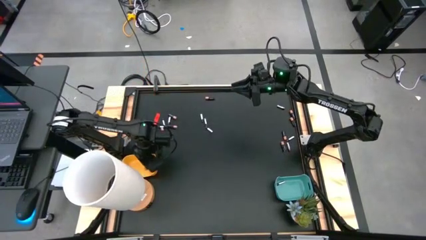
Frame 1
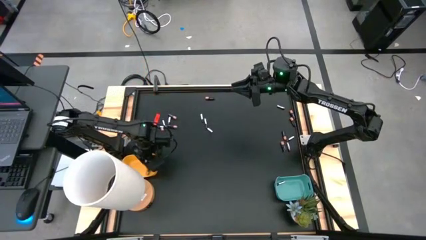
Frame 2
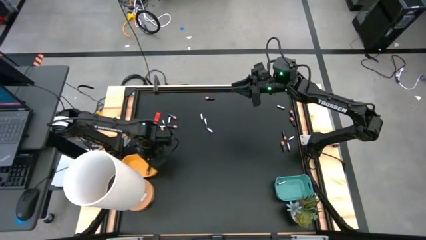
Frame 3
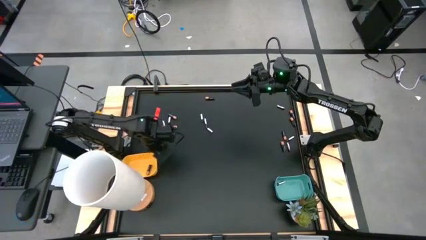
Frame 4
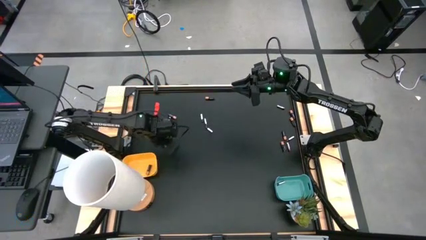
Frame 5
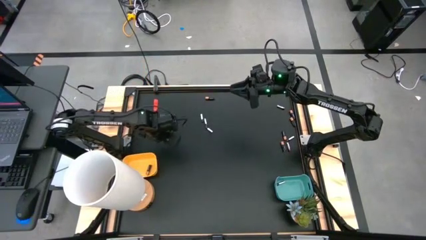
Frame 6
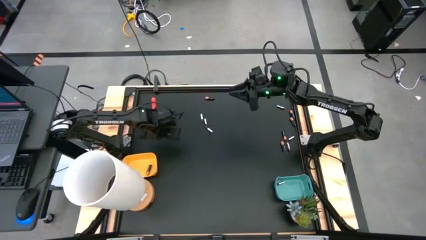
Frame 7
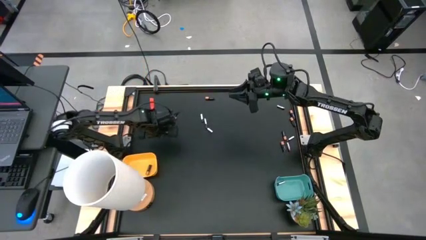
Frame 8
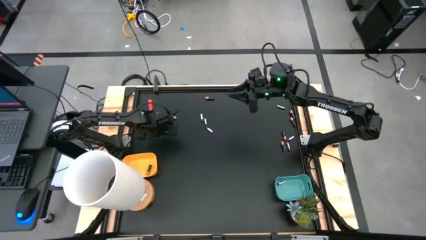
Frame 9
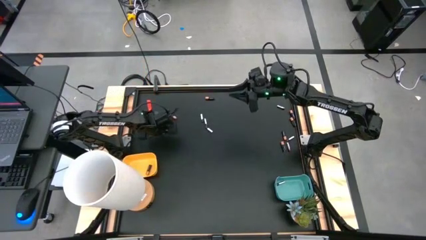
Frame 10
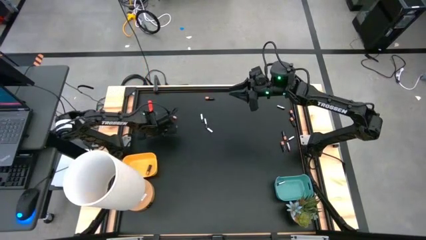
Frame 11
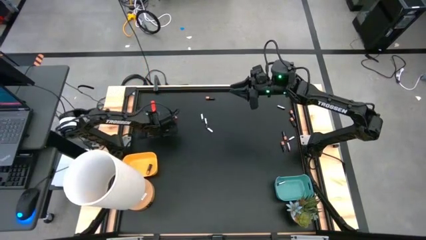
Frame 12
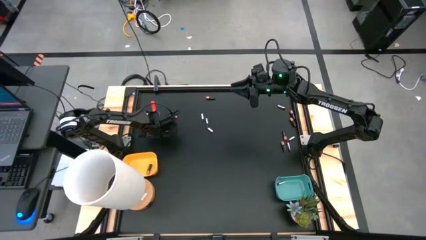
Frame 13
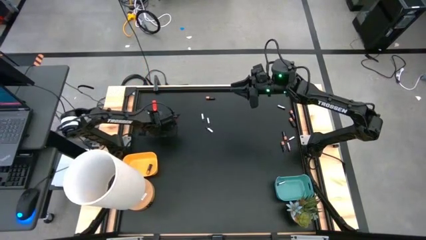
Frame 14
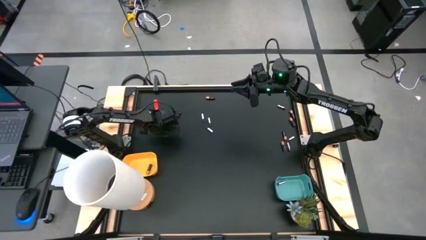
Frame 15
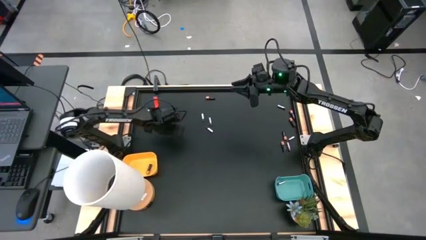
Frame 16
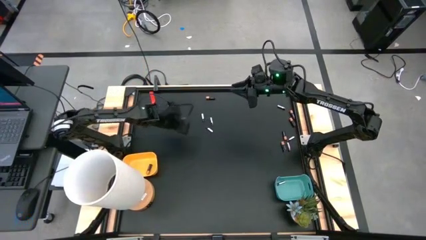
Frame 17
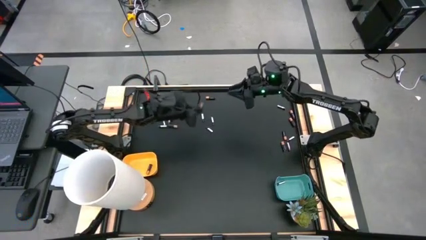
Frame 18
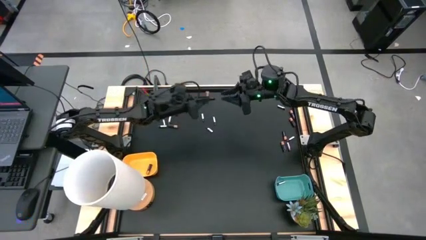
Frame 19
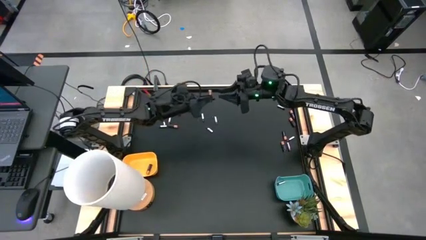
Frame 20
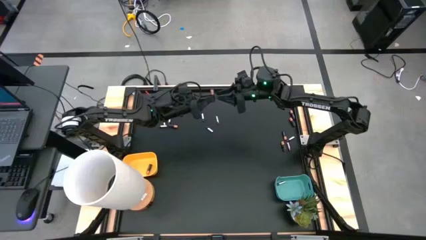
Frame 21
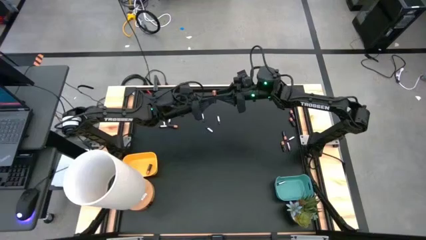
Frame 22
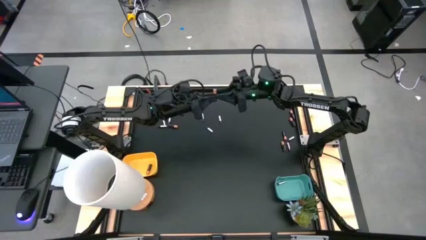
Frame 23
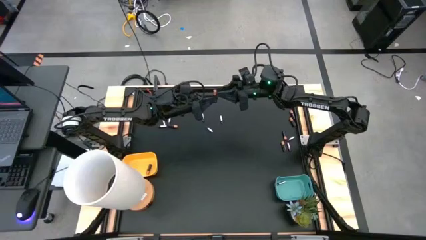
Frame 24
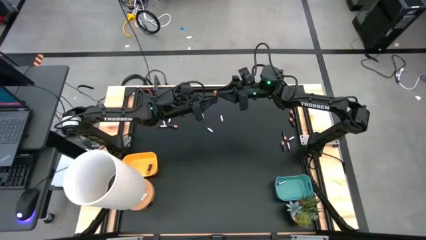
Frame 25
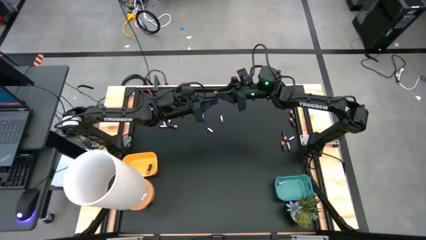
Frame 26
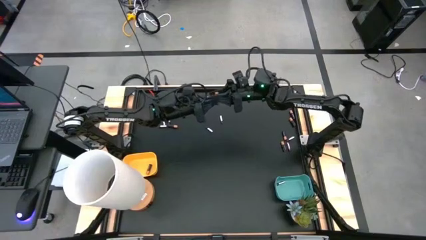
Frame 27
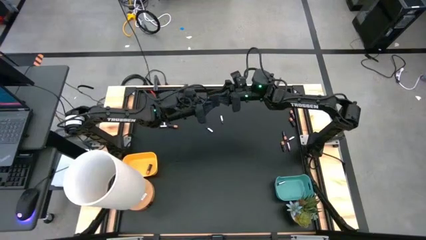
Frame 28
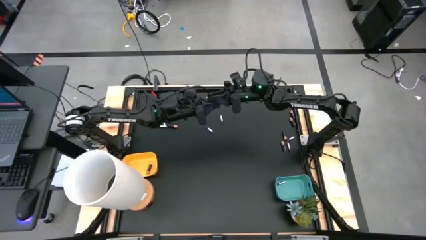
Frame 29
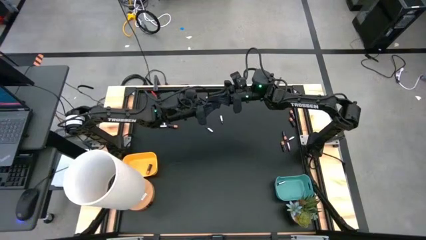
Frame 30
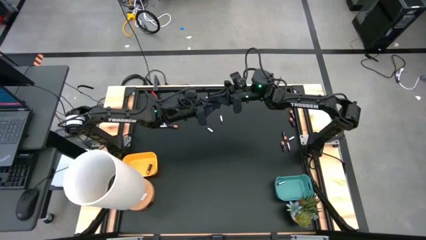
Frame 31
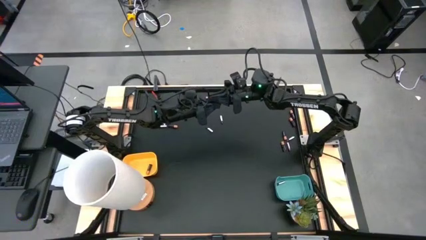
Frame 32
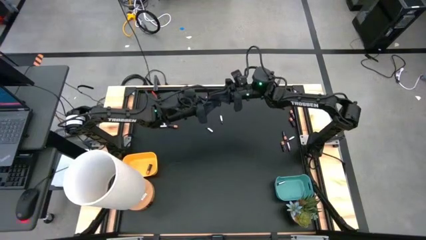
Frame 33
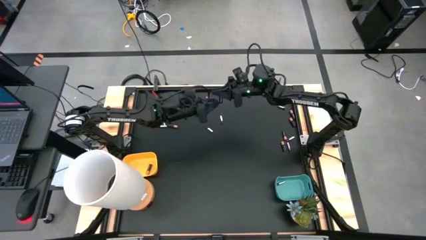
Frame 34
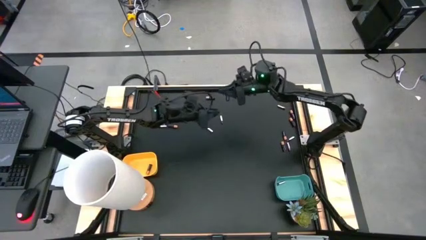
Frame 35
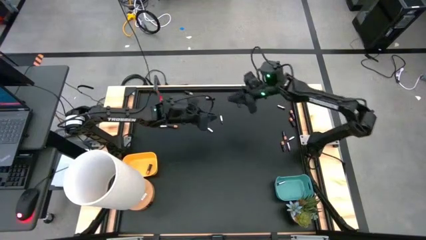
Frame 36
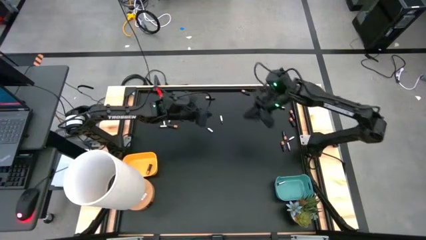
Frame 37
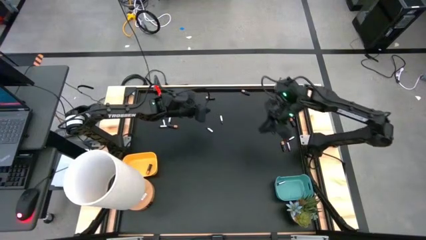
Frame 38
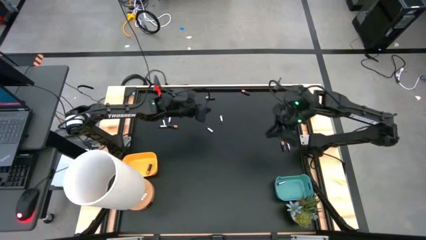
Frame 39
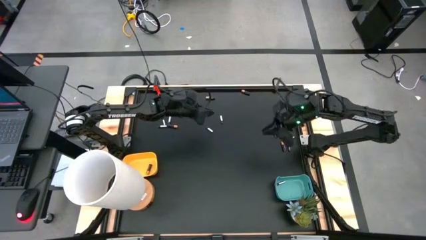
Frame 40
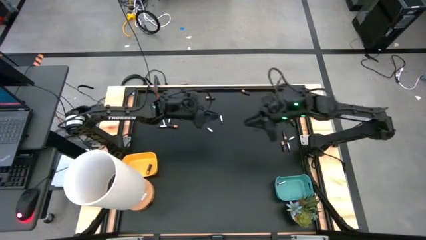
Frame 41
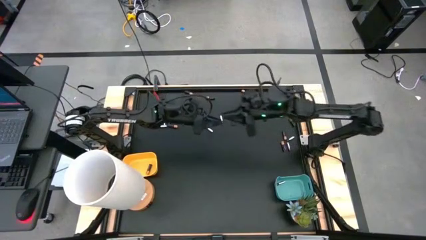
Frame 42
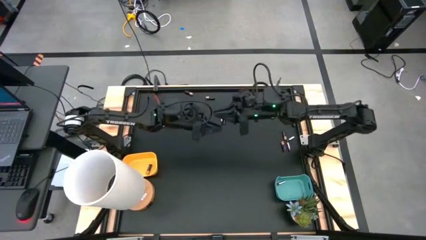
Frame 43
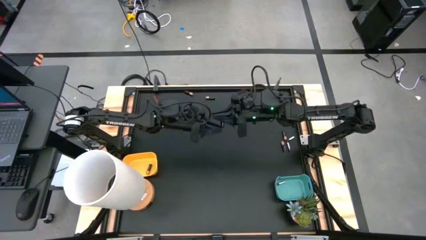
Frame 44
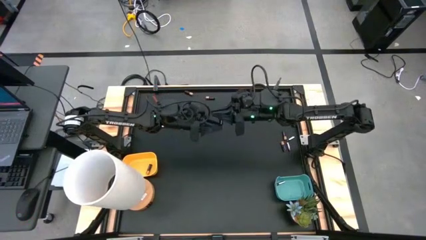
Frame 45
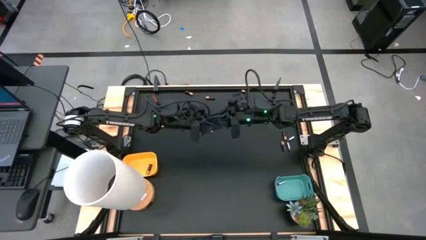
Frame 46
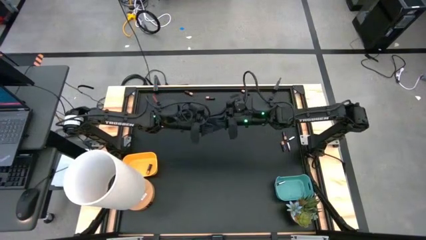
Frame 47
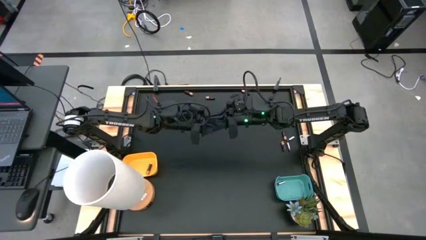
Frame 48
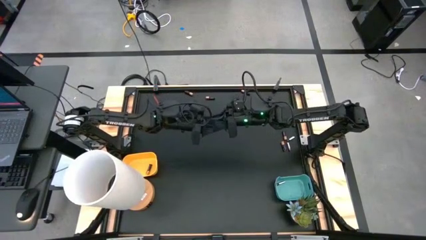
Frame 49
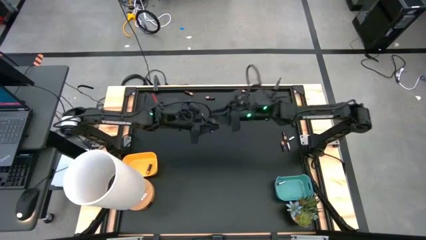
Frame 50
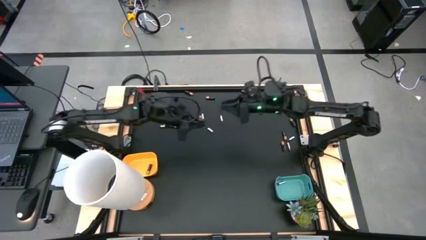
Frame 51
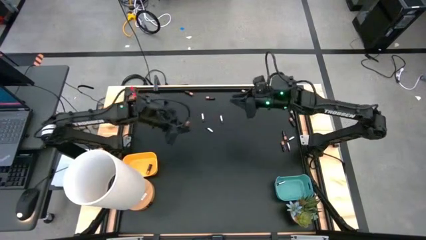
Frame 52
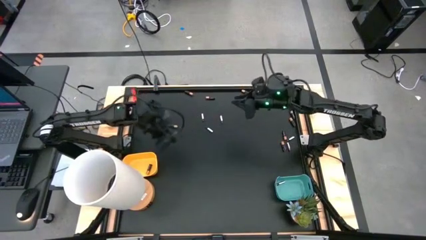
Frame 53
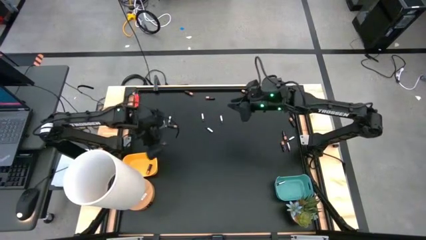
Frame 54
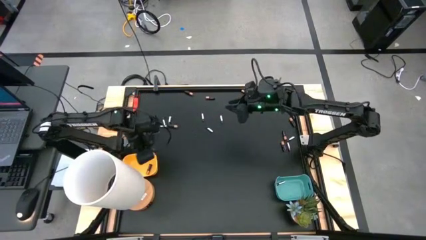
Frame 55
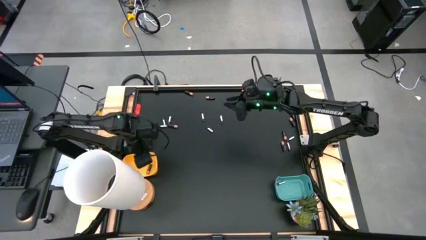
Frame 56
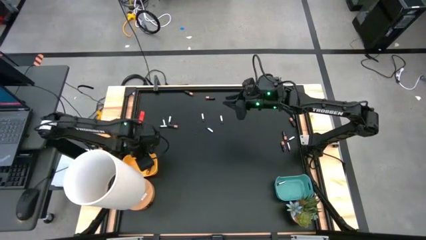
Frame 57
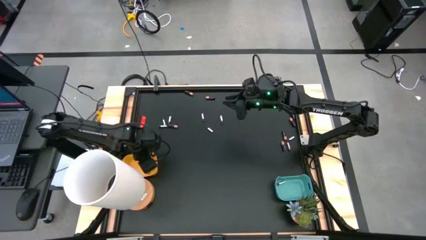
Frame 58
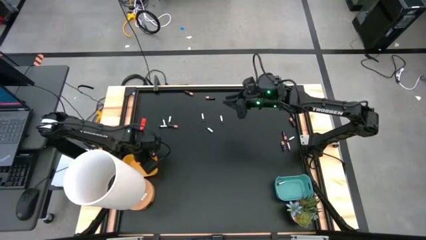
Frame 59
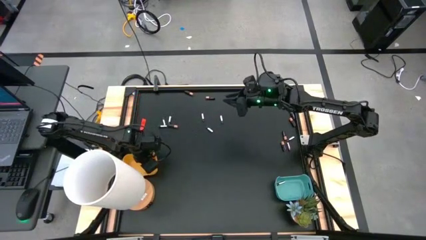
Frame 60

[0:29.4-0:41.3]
Task: Sort batteries
Put the black battery into the yellow bin

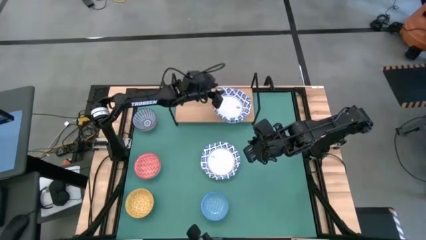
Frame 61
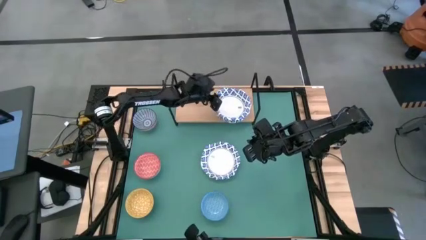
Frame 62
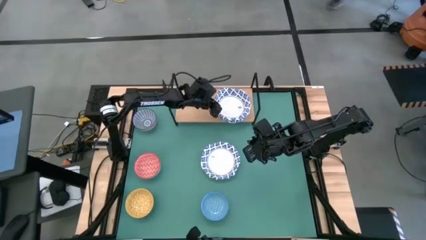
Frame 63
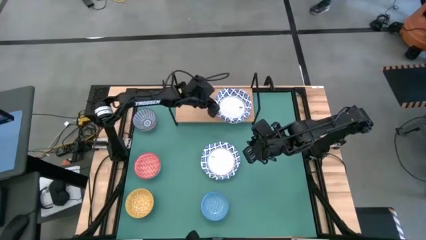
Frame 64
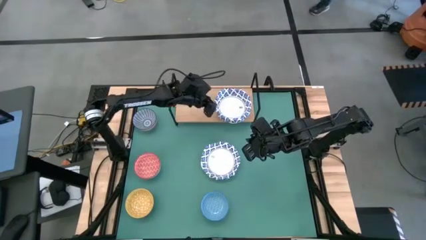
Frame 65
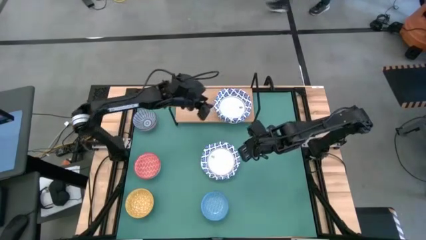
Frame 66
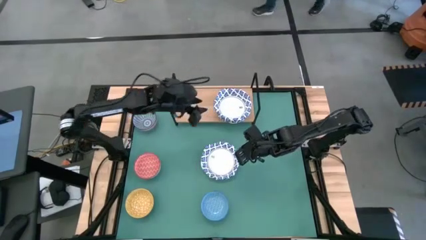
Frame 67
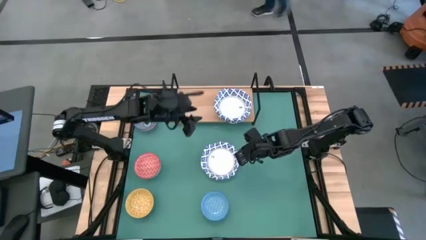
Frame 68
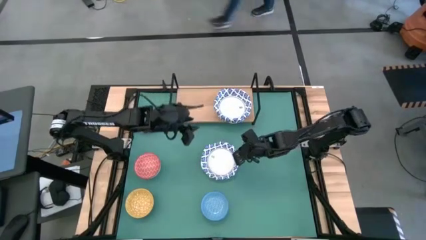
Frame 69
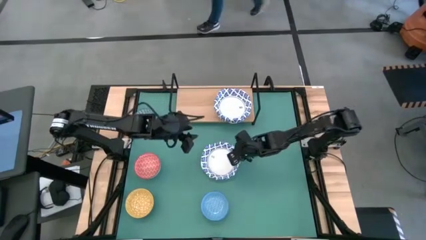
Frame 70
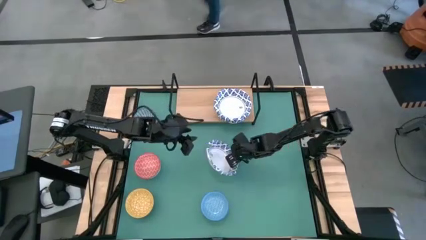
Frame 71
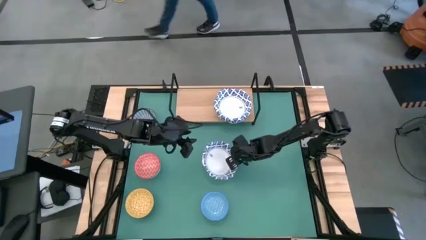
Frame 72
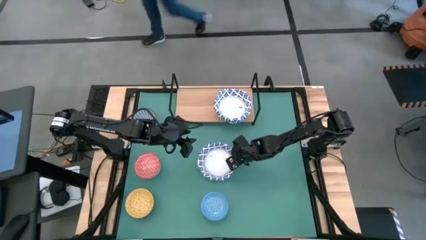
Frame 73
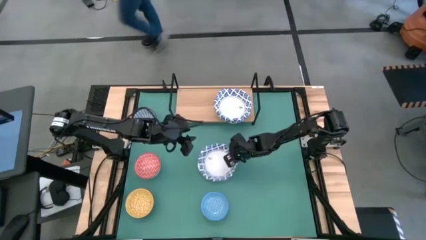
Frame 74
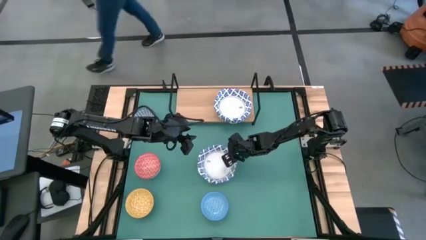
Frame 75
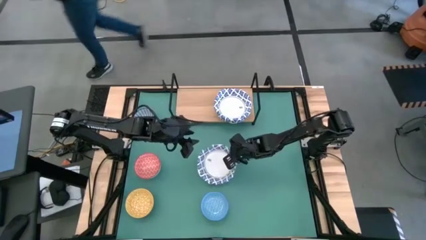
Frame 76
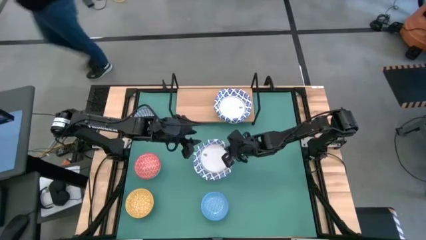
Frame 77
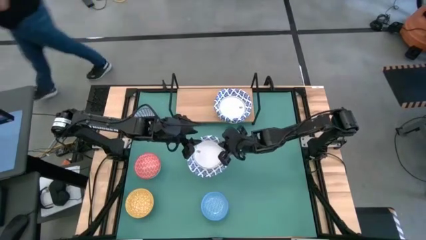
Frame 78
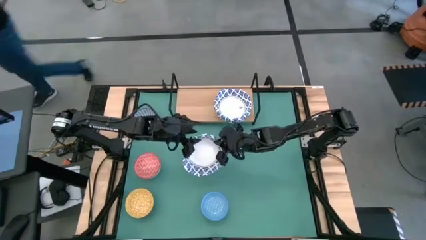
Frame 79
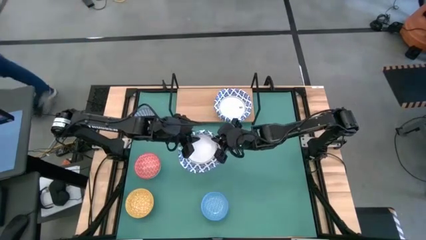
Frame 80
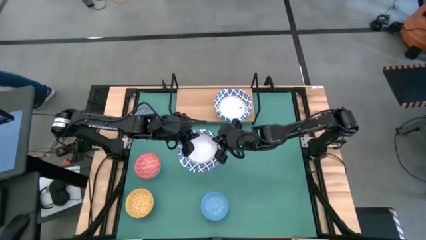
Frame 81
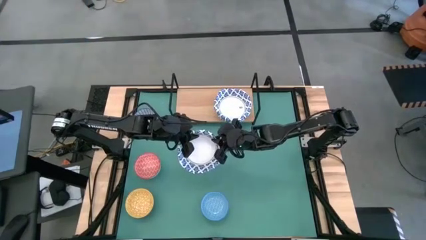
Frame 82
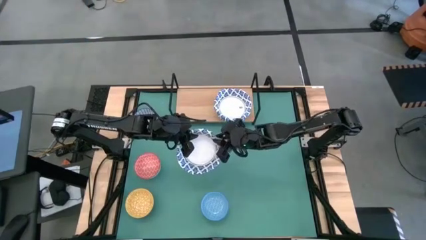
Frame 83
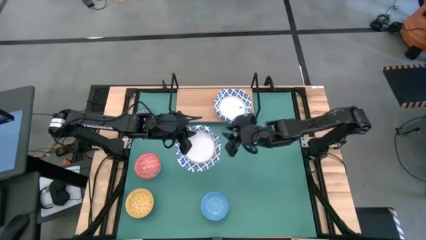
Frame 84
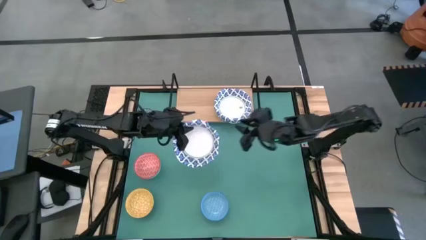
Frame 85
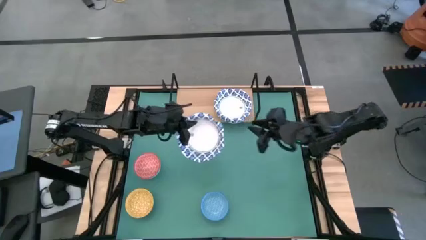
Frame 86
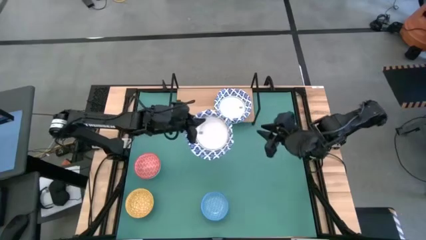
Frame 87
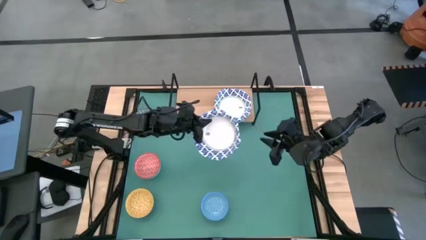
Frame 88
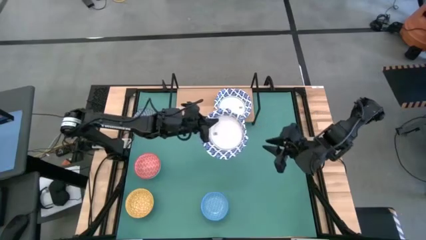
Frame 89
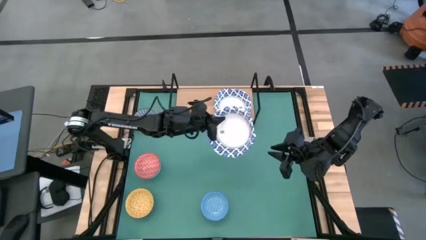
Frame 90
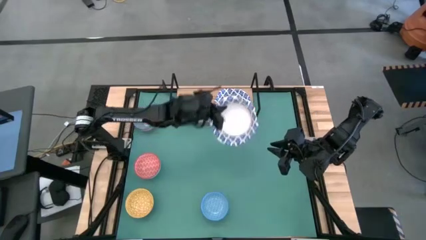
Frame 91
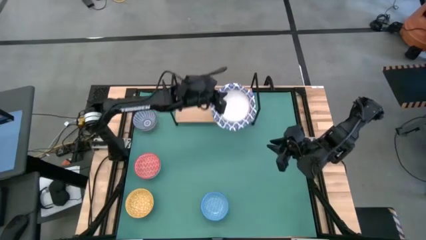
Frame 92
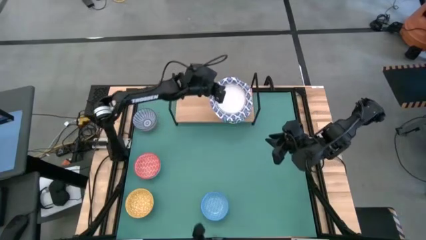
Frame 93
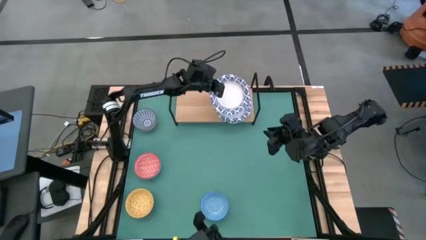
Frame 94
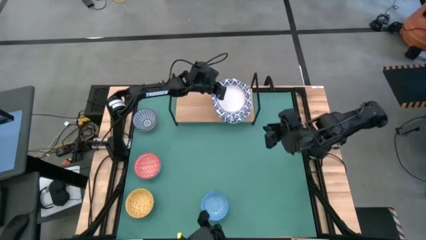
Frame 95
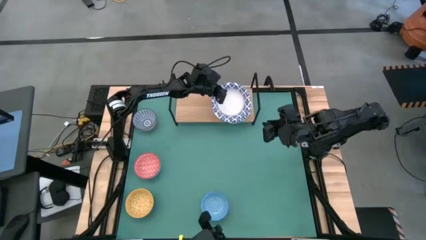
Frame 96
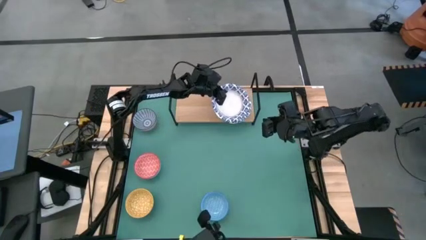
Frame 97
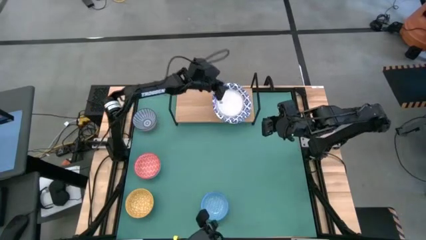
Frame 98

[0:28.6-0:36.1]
Task: Place and stack bowls onto a shelf
Stack the white bowl on top of the white bowl on the shelf
